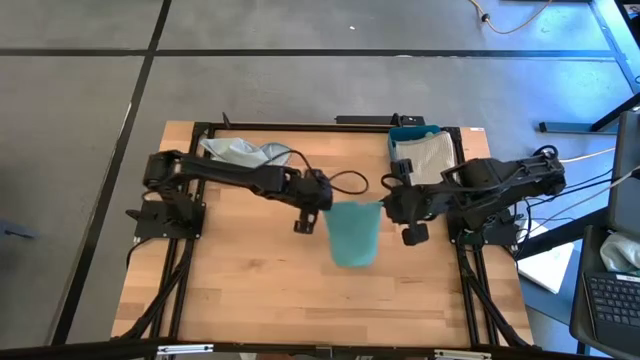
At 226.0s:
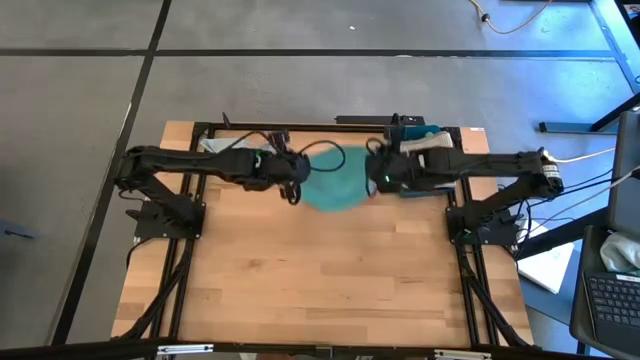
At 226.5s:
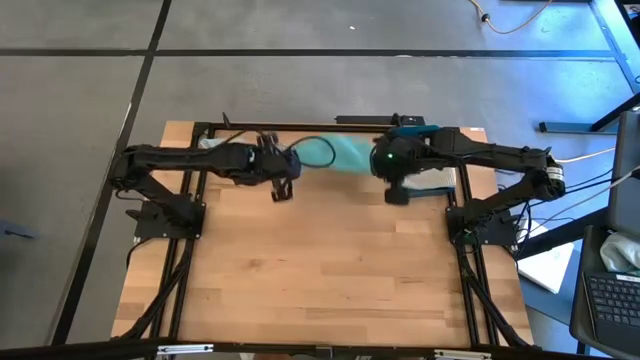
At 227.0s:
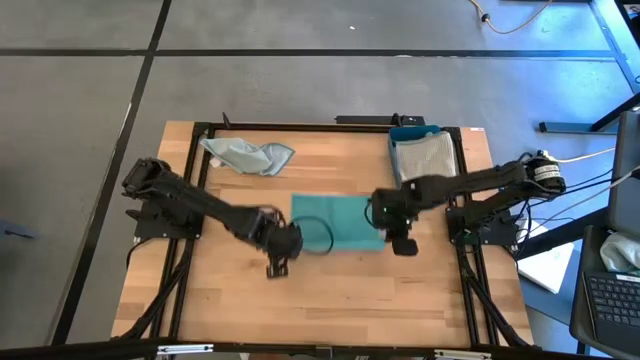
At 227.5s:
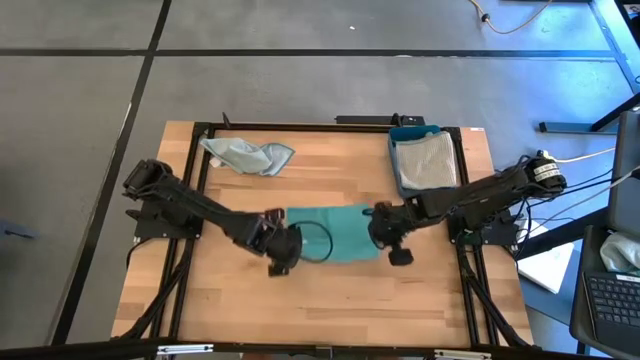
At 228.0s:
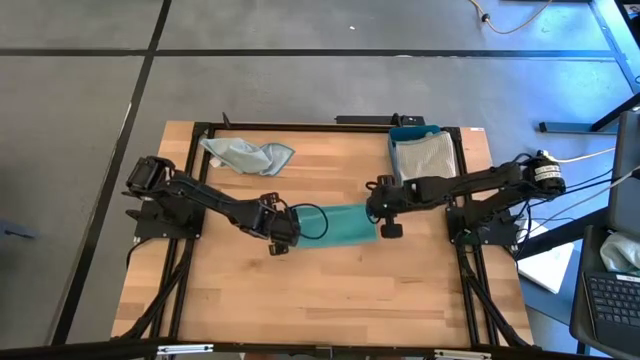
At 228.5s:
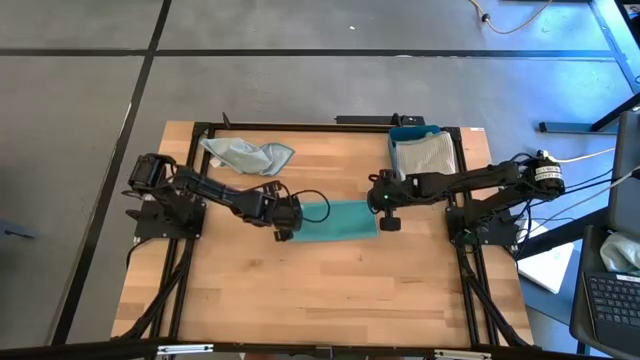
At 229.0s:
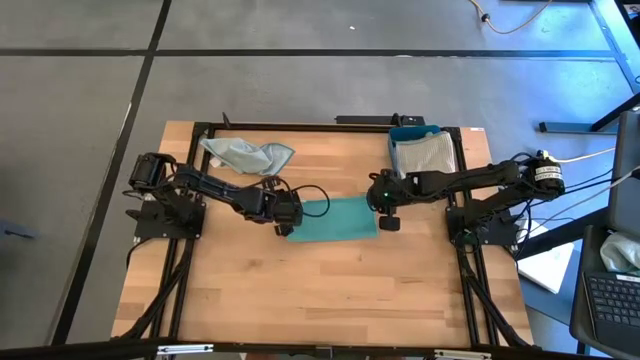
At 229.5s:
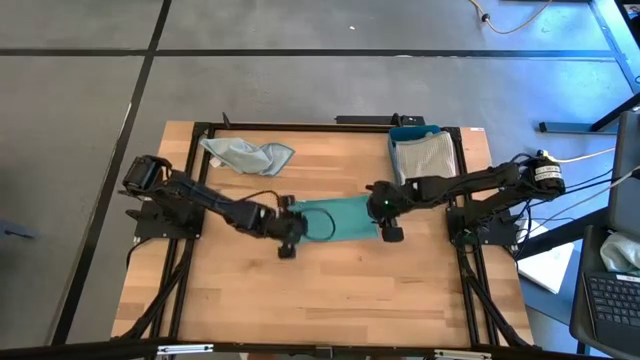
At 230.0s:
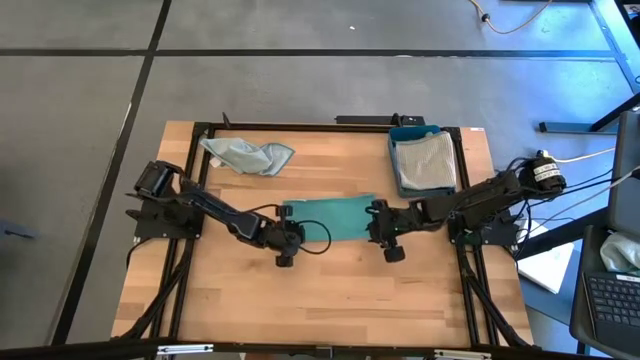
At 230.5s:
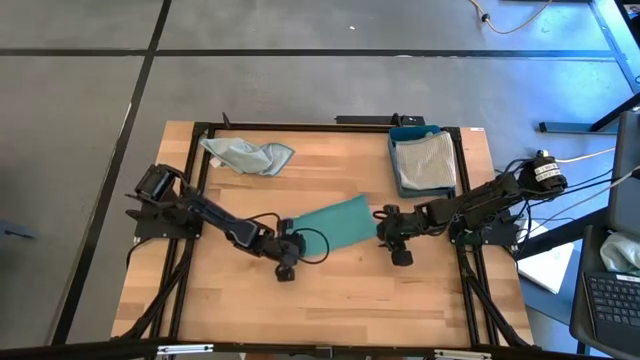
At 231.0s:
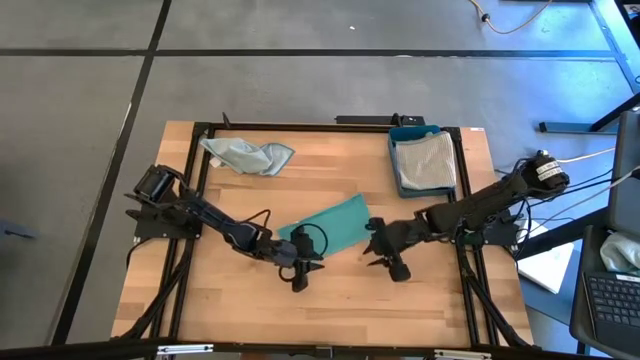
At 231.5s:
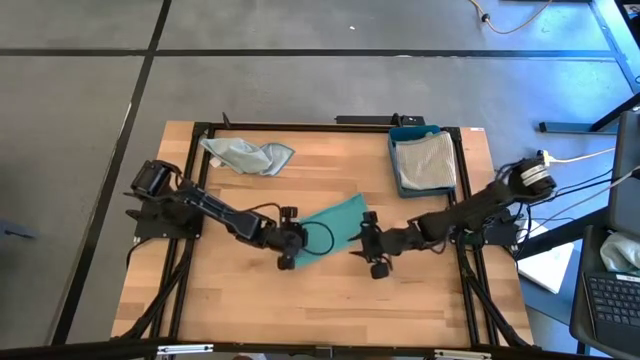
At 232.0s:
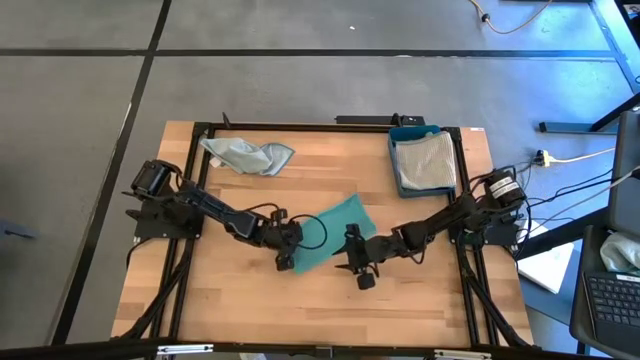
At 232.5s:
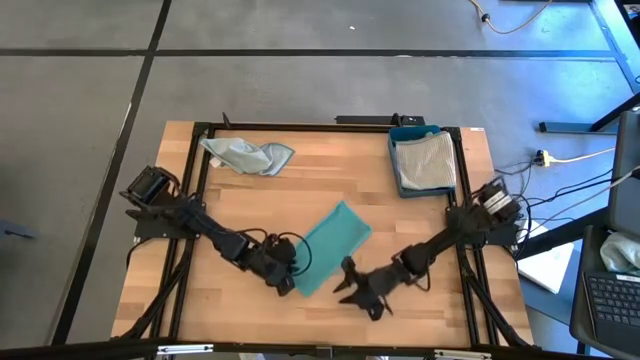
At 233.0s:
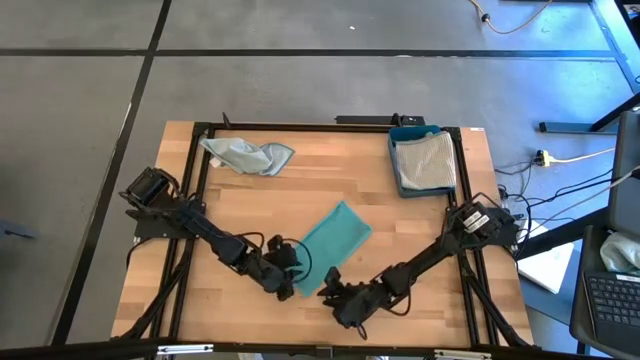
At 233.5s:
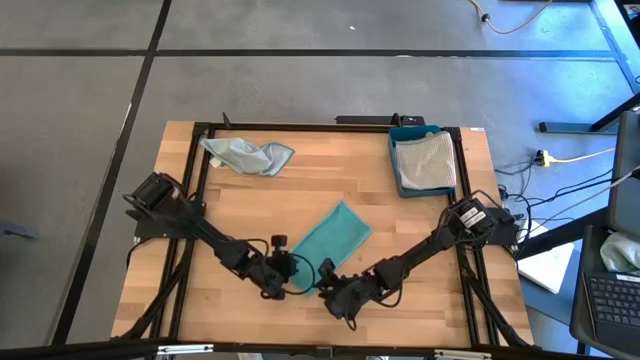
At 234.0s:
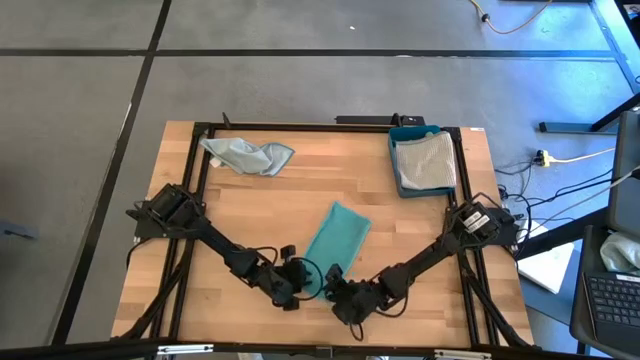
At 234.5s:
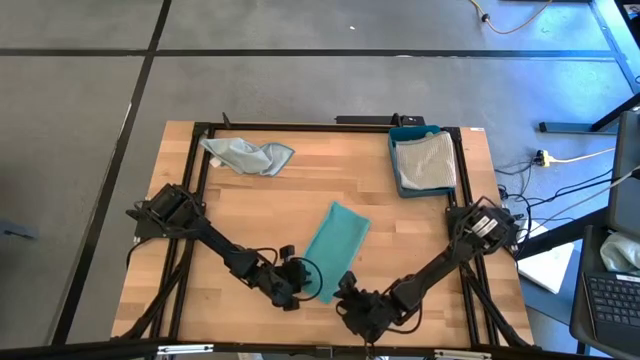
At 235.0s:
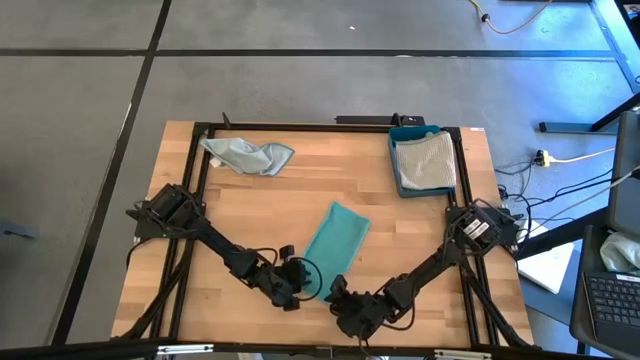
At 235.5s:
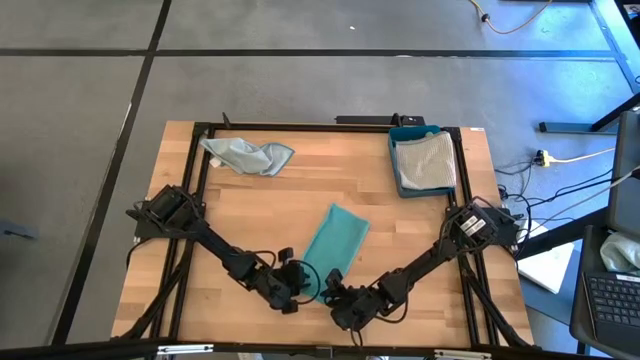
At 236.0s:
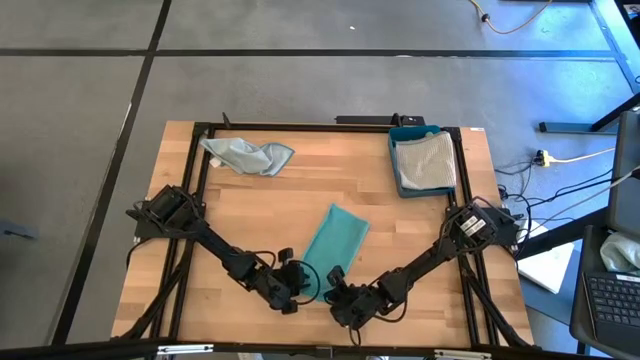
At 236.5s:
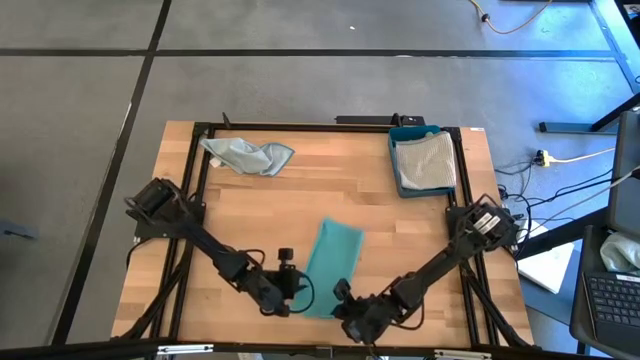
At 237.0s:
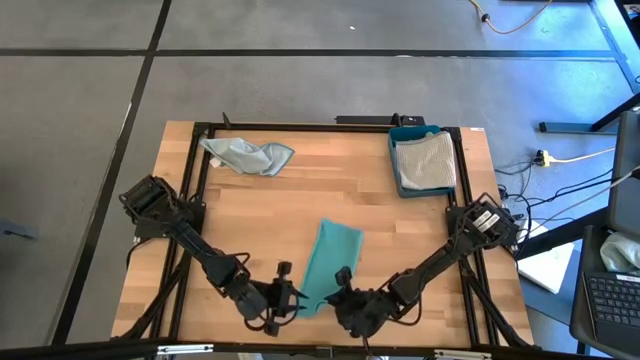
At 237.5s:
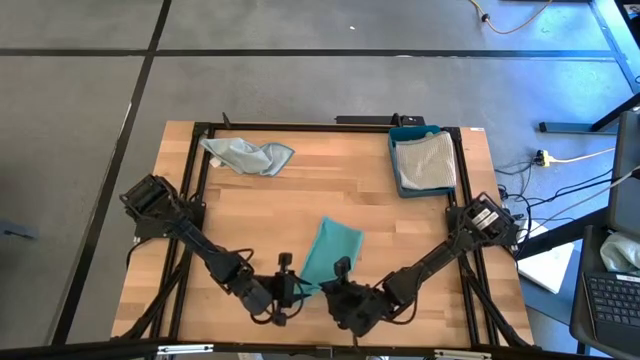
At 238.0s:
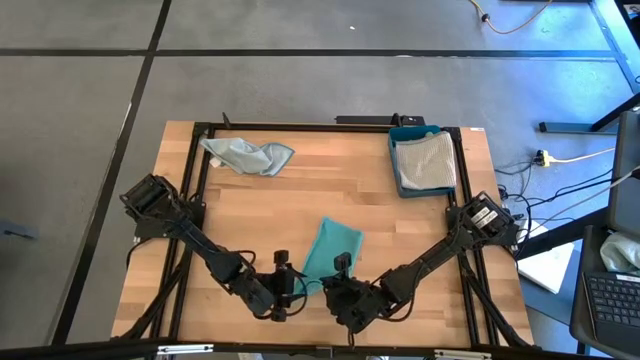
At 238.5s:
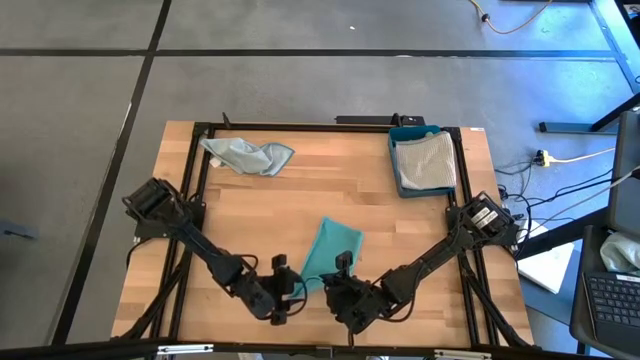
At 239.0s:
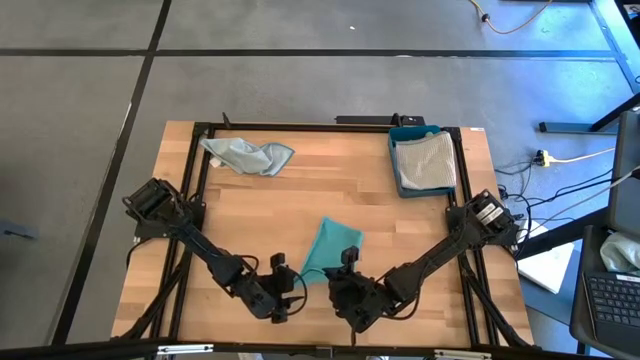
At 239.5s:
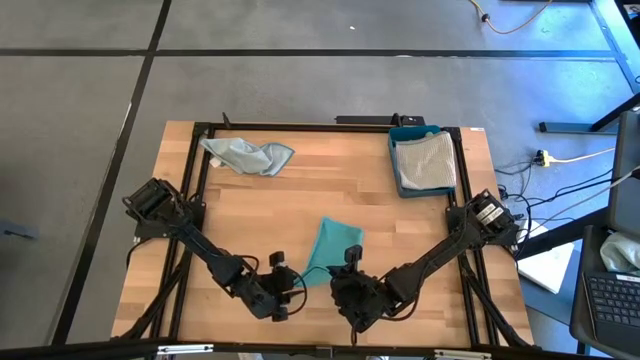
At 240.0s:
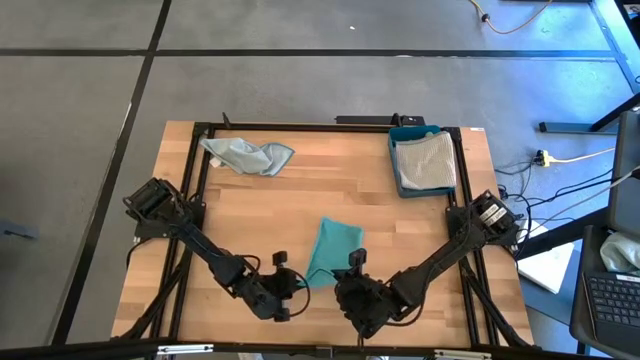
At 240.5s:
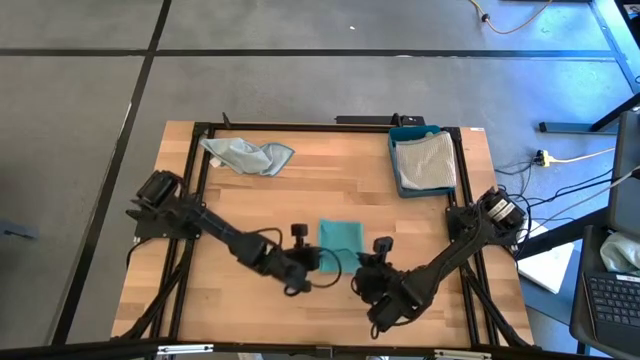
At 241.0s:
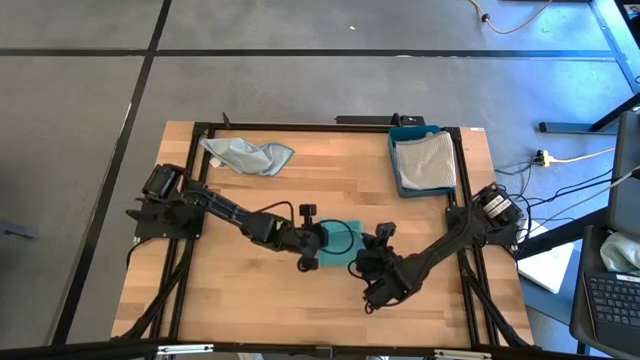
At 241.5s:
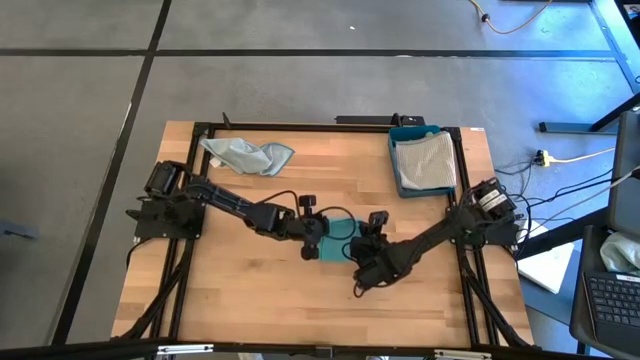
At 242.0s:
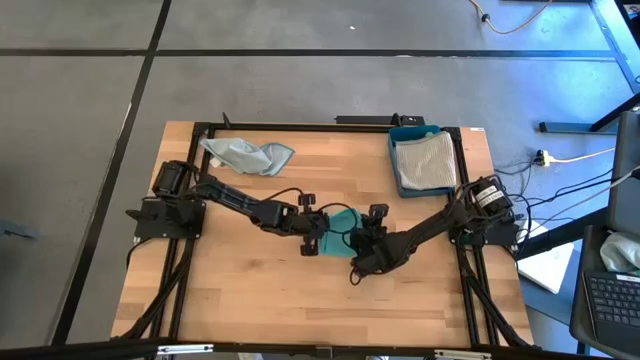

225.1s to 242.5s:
Task: Fold microfiber towels
Fold the blue microfiber cloth

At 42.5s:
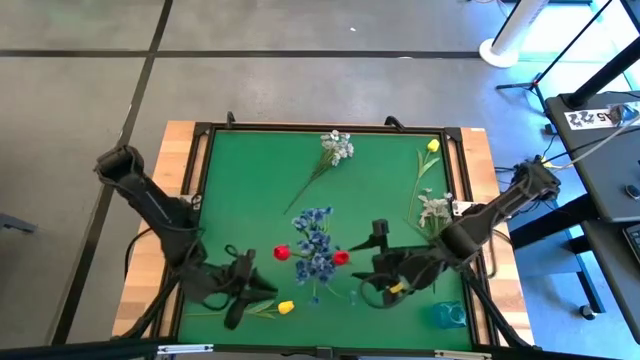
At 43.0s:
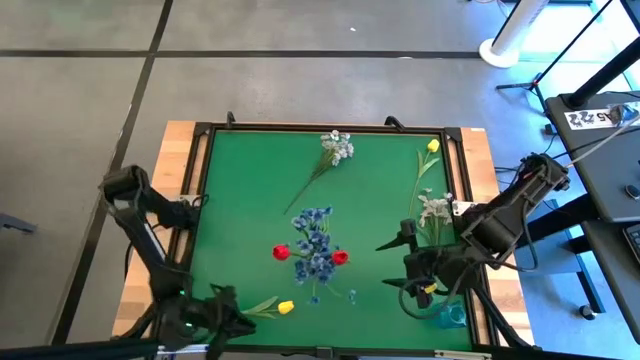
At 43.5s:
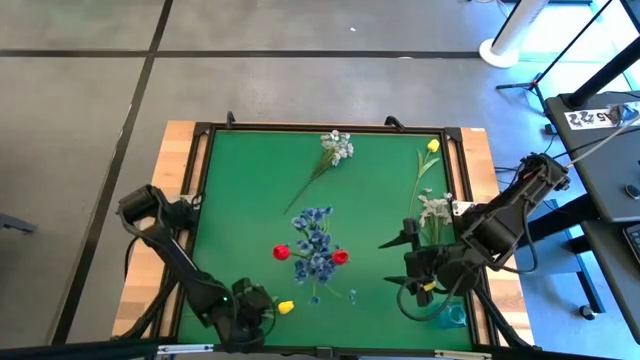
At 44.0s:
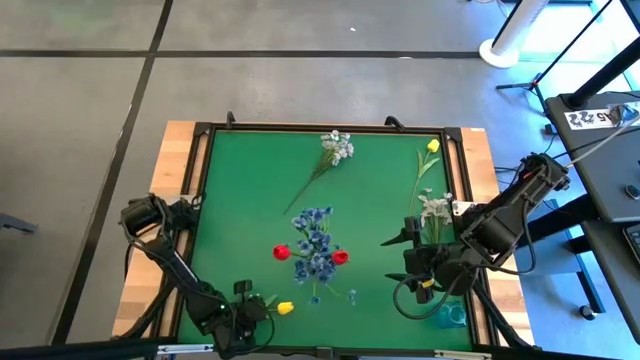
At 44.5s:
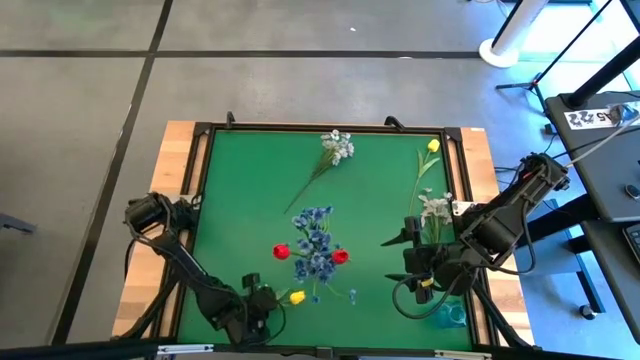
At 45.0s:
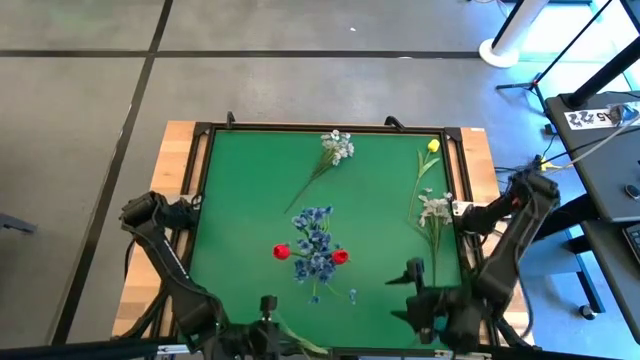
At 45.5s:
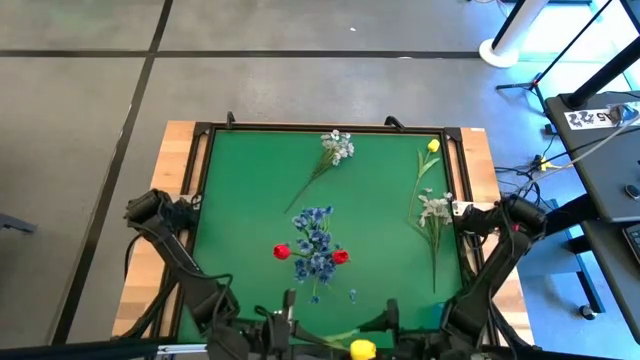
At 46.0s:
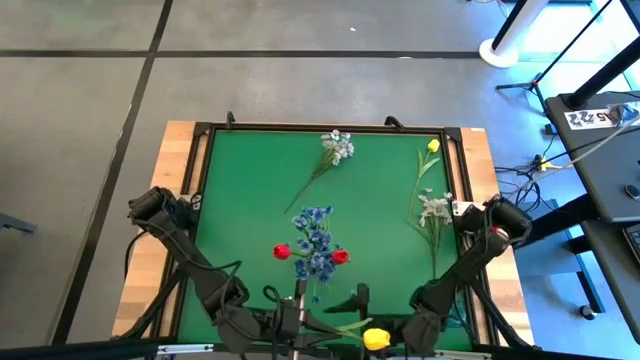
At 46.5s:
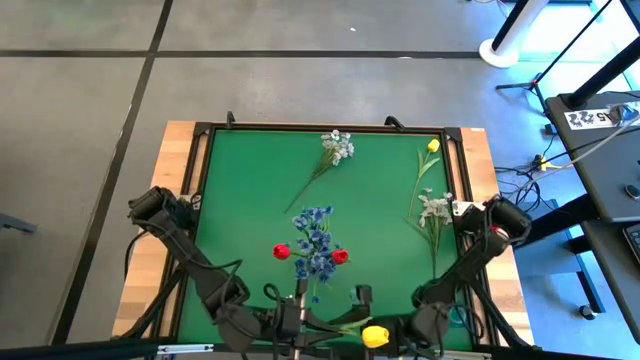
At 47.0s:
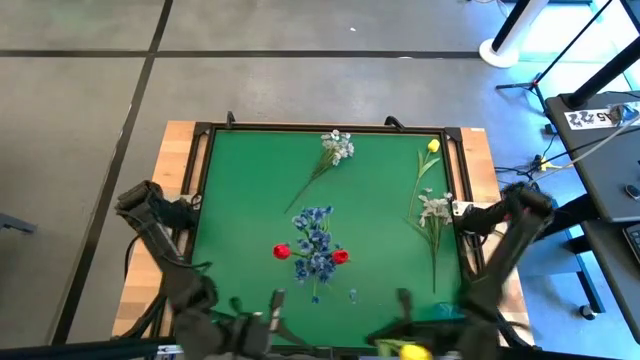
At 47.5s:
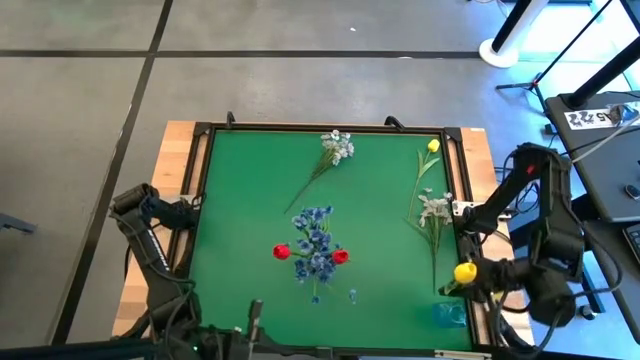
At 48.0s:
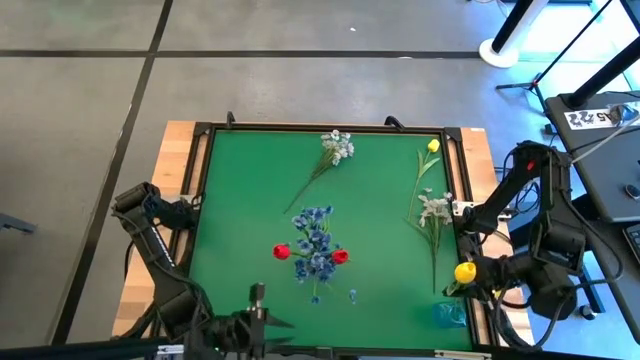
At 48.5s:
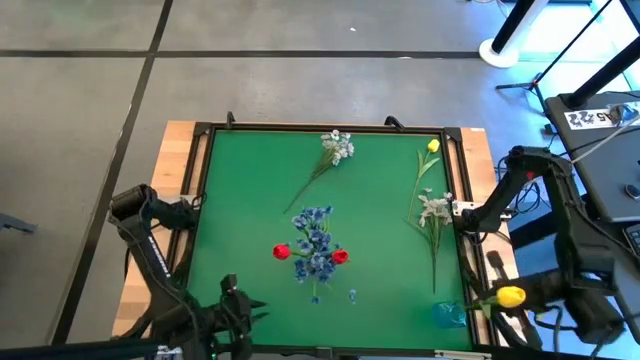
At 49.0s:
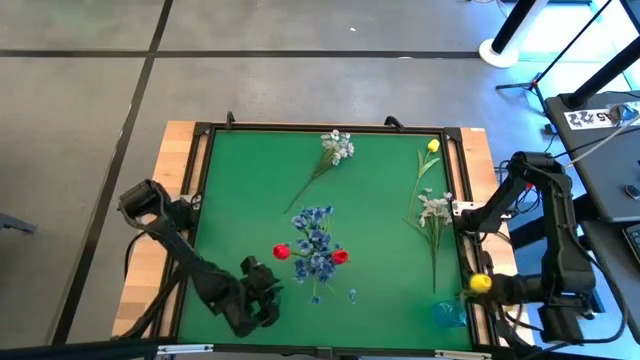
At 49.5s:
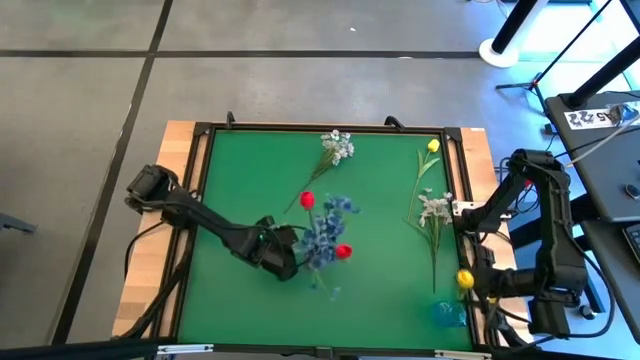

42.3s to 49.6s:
Task: Sort flowers into vase by color
Put the bottom yellow flower into the blue vase
